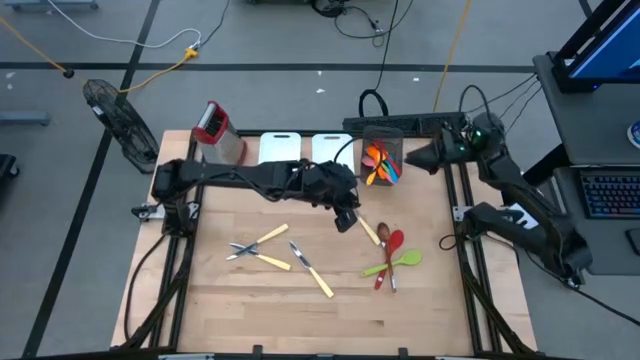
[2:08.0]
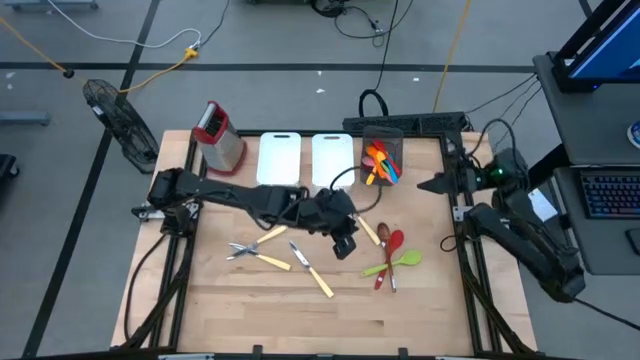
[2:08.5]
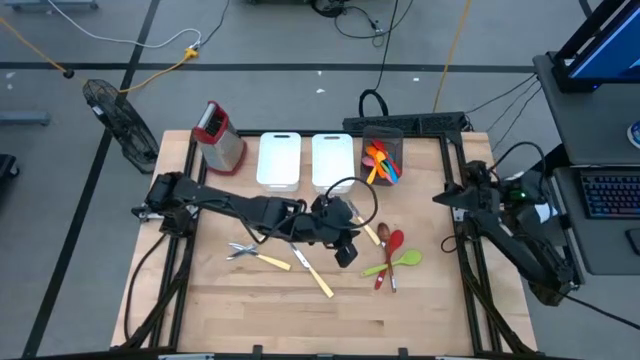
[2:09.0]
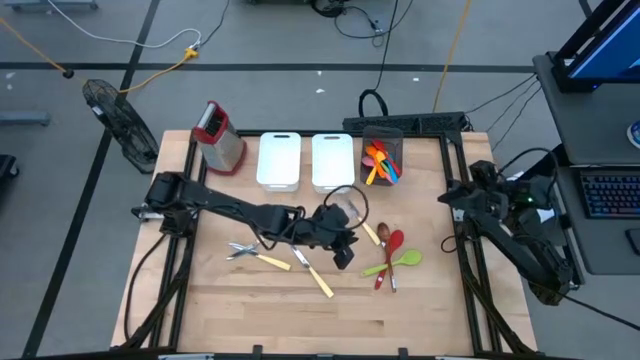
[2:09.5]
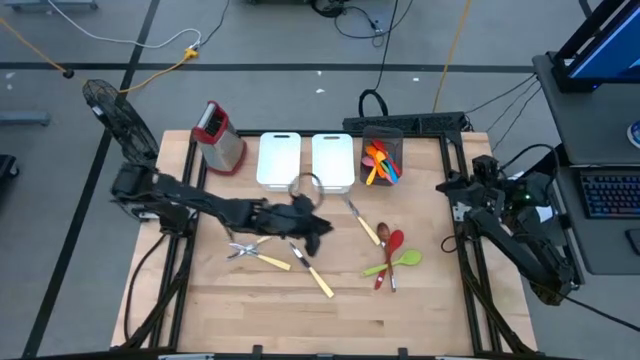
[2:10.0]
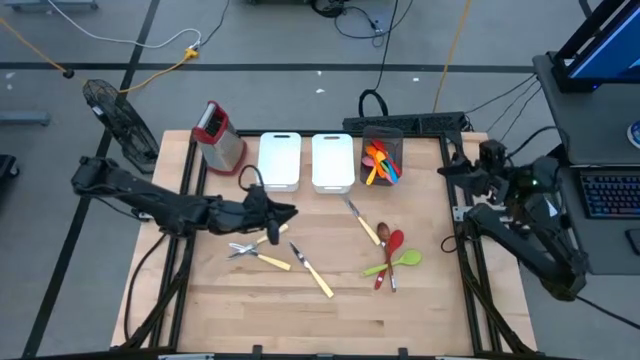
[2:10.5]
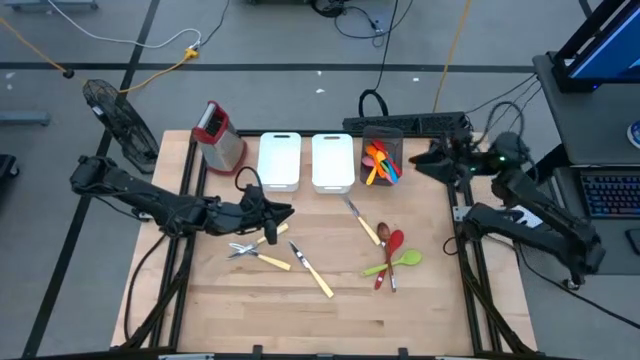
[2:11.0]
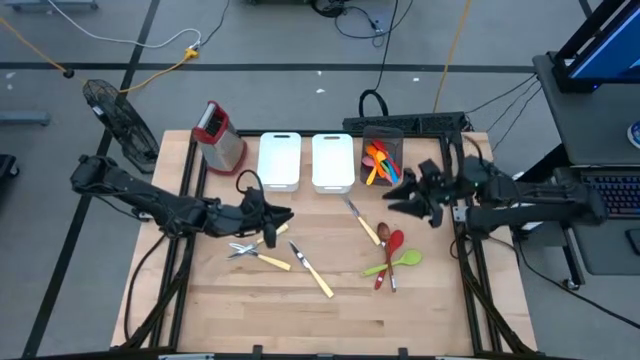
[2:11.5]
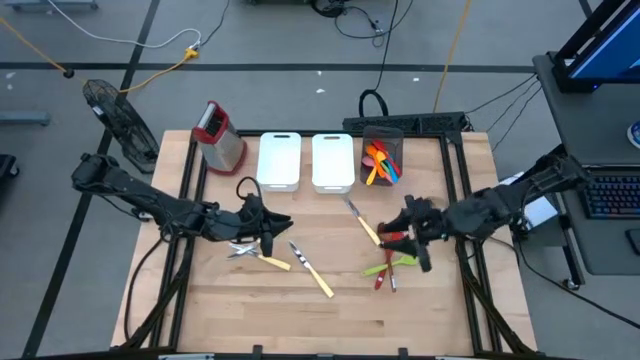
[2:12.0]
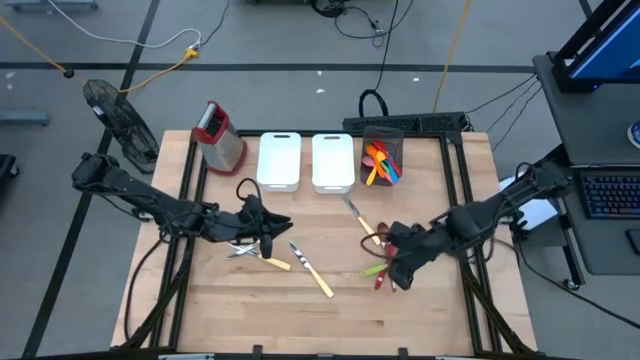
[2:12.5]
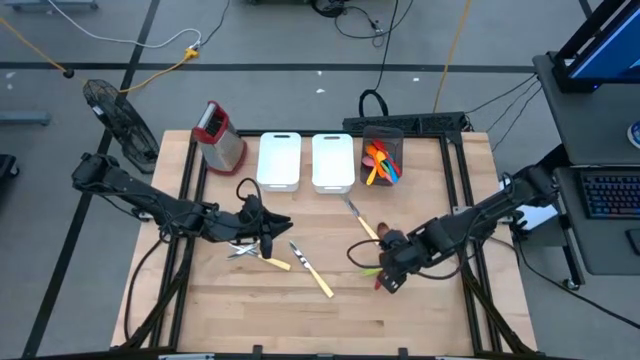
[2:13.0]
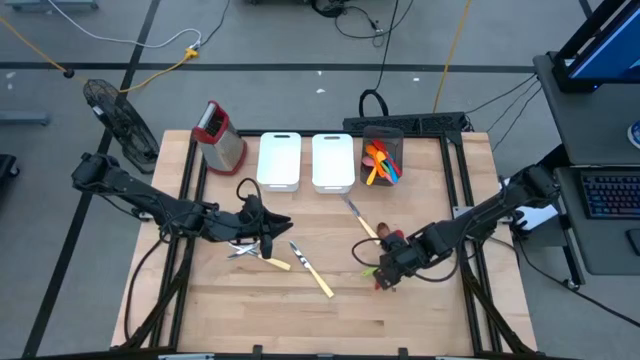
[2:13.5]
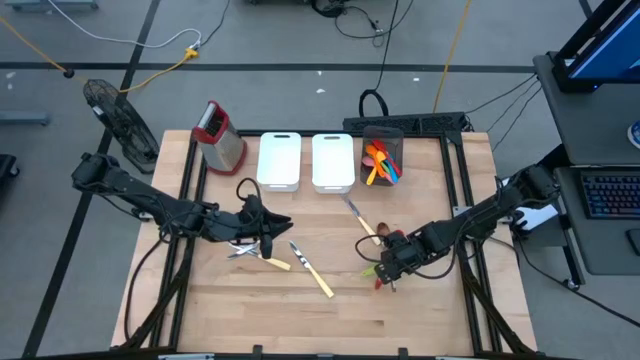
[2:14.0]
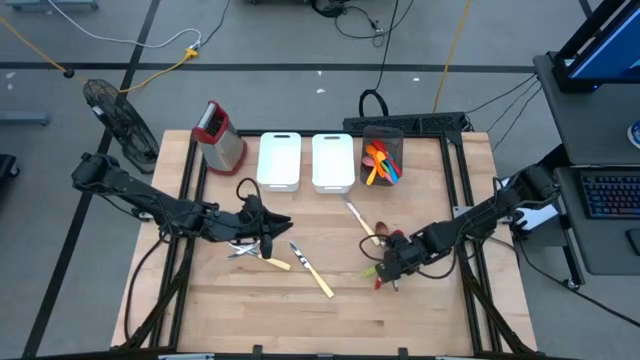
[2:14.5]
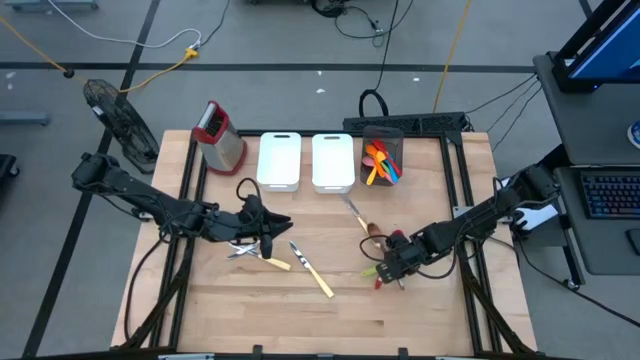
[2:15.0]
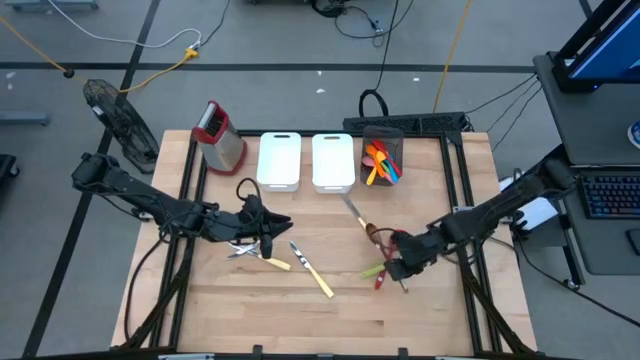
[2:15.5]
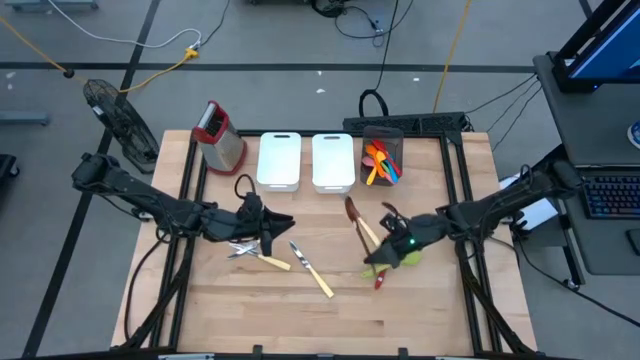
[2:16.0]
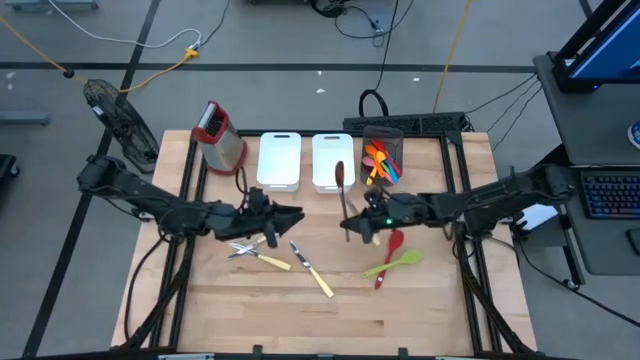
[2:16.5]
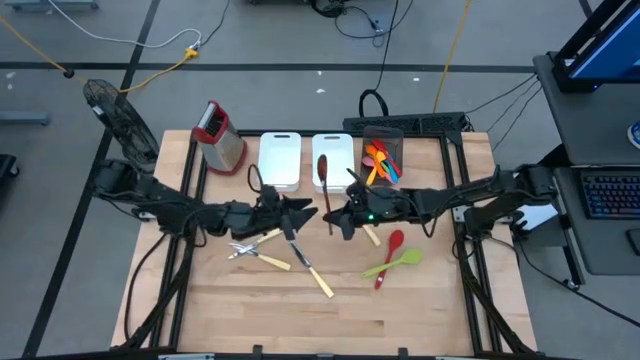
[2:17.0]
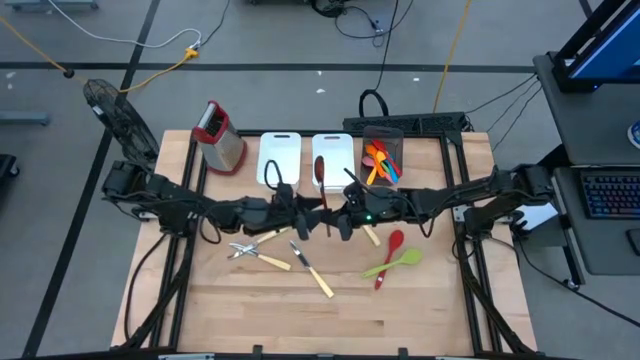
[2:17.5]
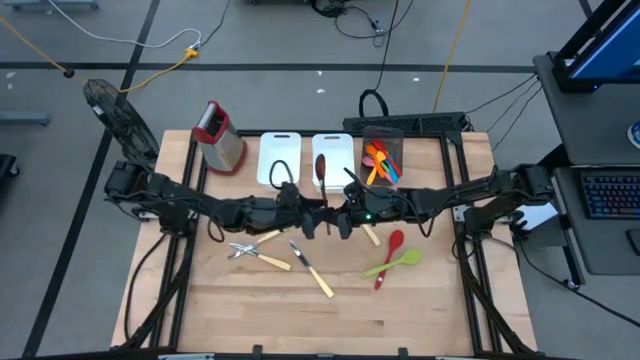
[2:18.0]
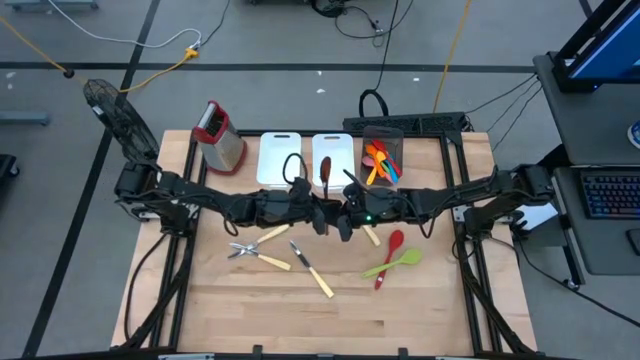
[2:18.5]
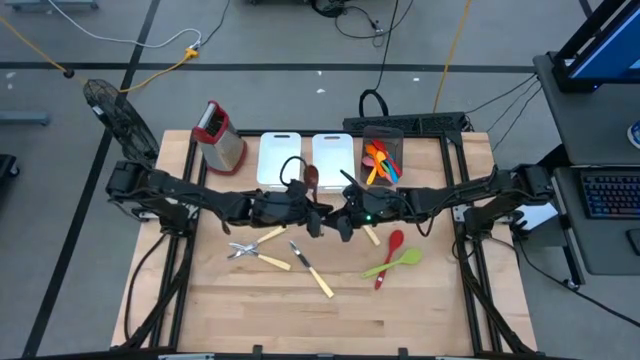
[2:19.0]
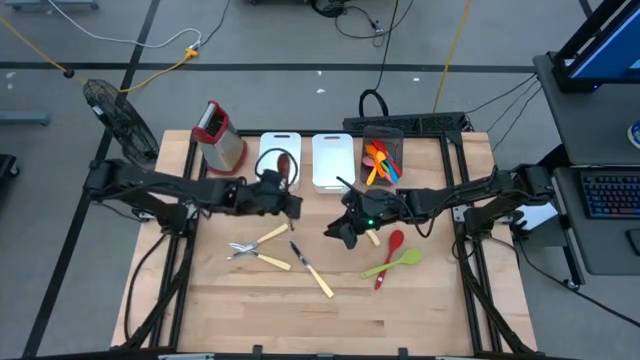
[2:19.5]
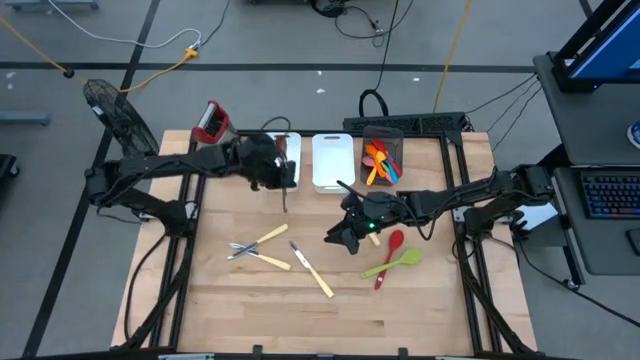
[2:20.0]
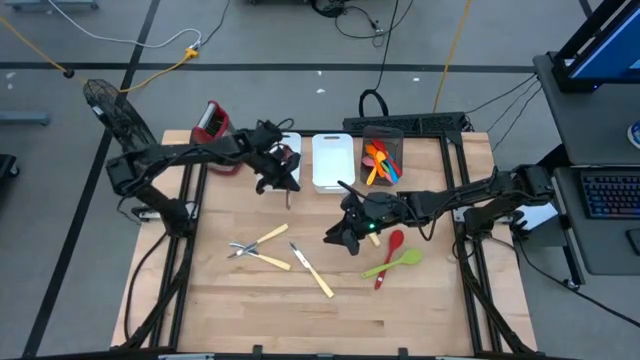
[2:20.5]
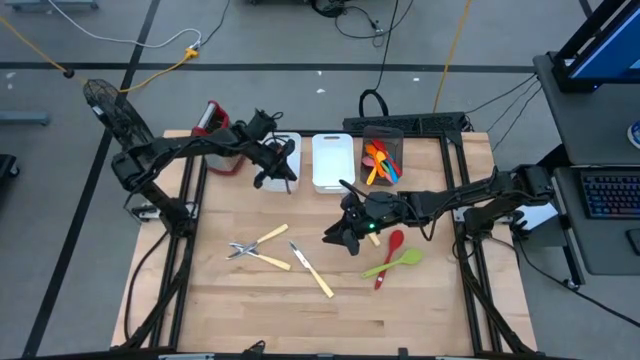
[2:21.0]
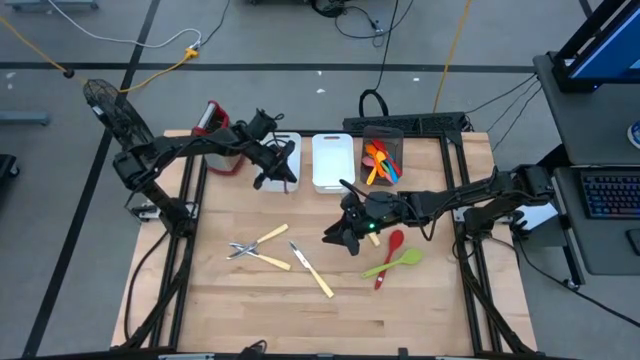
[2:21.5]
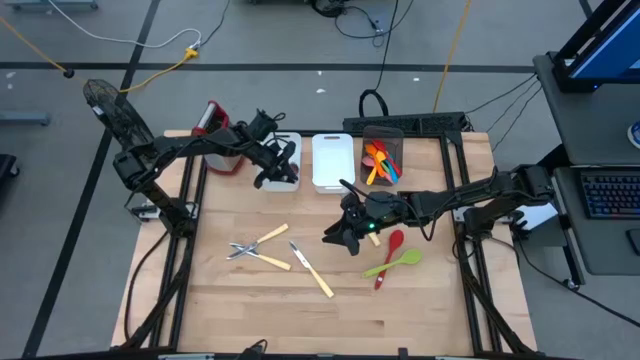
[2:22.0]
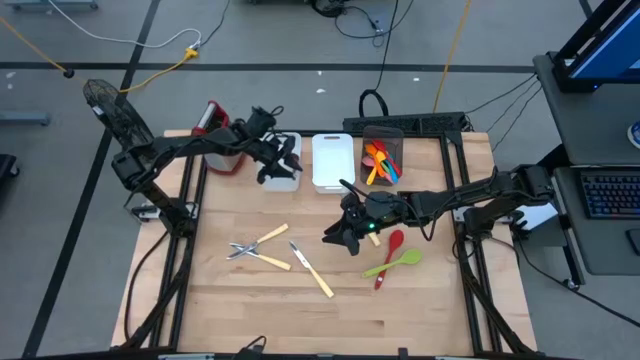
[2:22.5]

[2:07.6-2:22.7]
Task: Pick & Place Kitchen Items
Put the brown wooden serving spoon into the left white bin

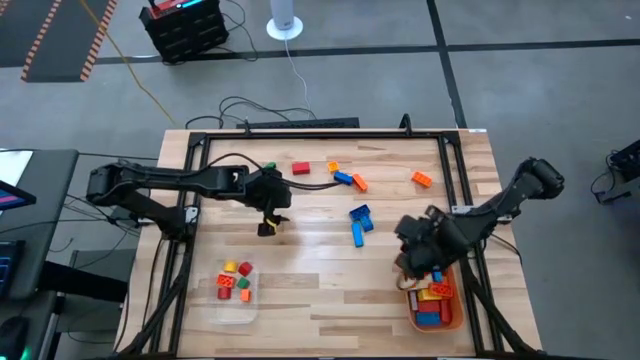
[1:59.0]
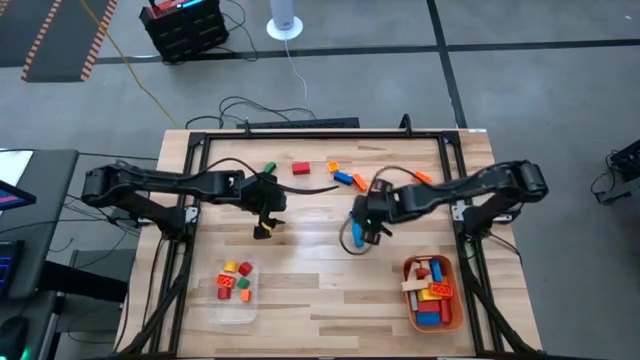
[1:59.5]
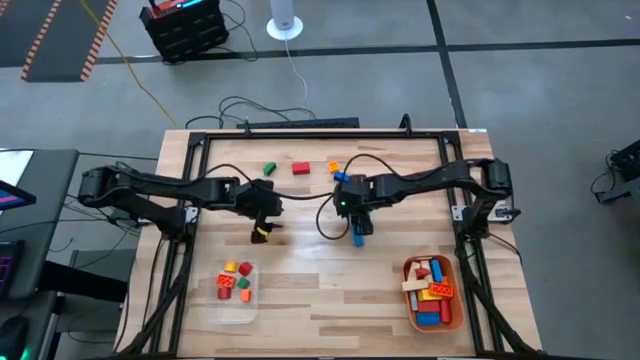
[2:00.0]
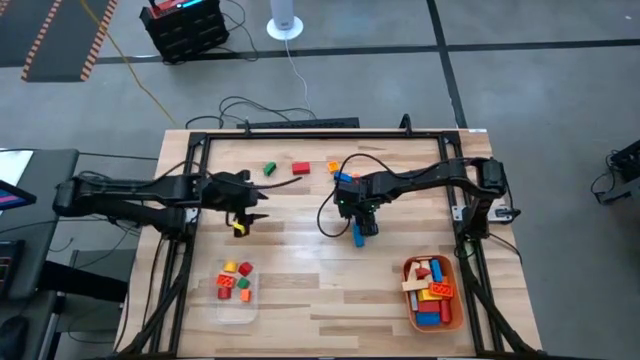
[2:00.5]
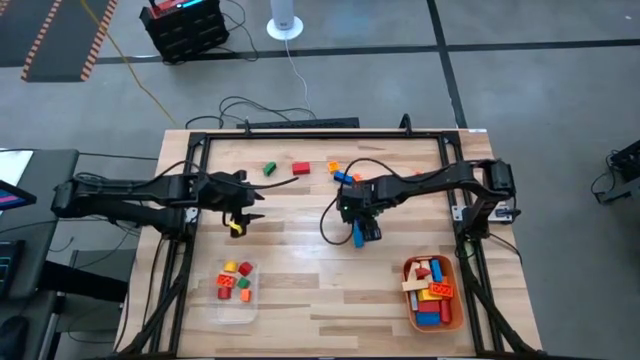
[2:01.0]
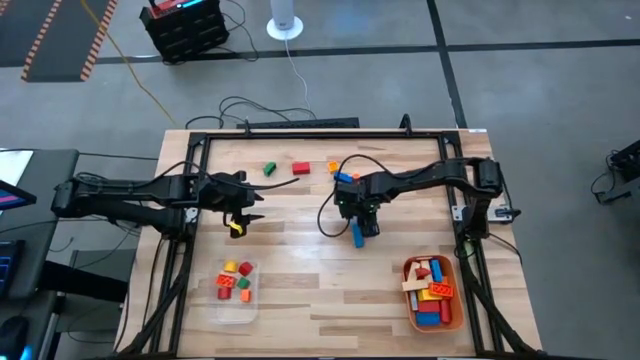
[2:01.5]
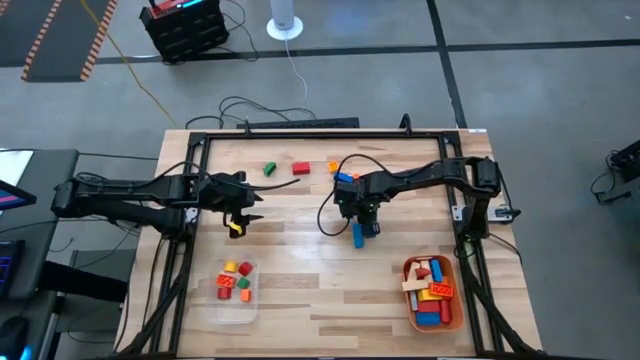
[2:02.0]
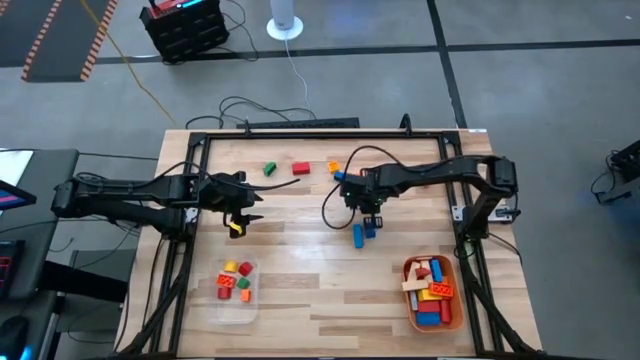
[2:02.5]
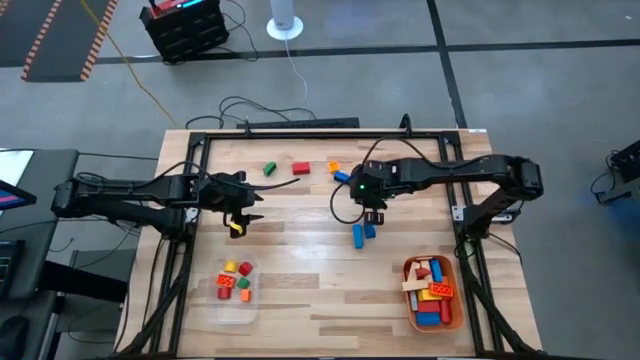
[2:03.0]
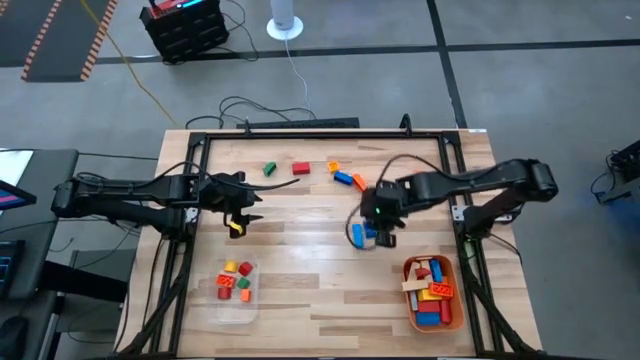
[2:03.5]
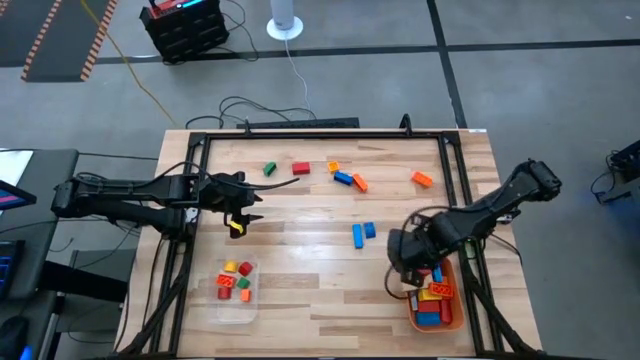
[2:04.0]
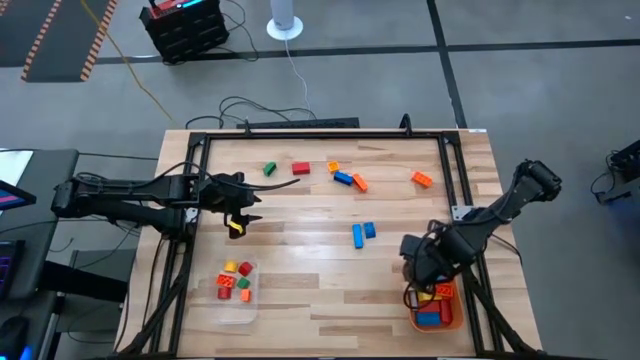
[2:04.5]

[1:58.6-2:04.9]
Task: Sort blocks by size
Put the large blue game piece into the orange bin

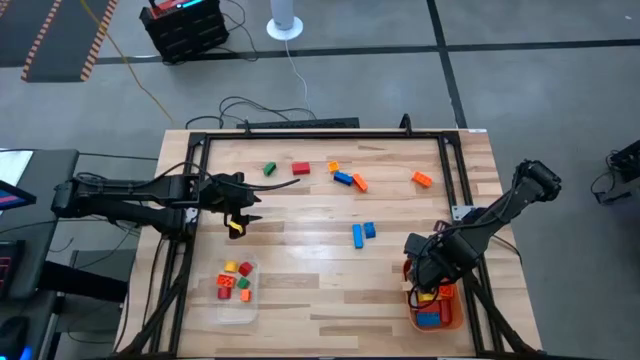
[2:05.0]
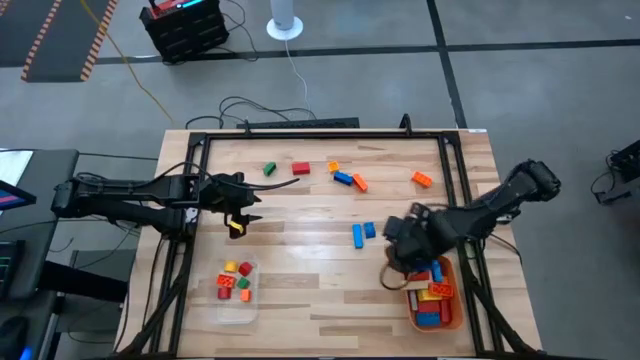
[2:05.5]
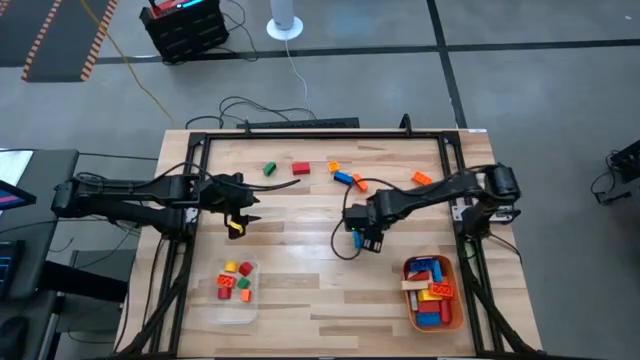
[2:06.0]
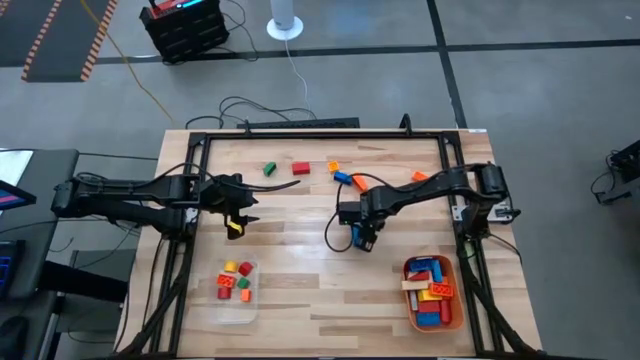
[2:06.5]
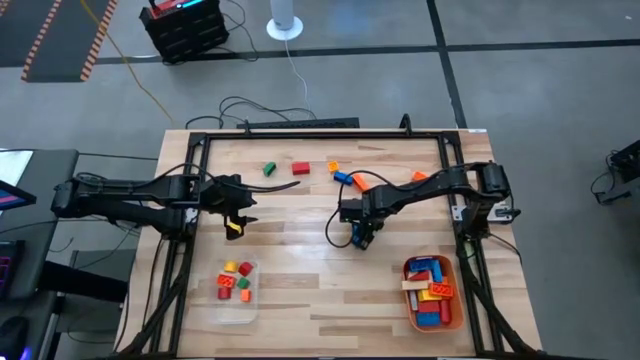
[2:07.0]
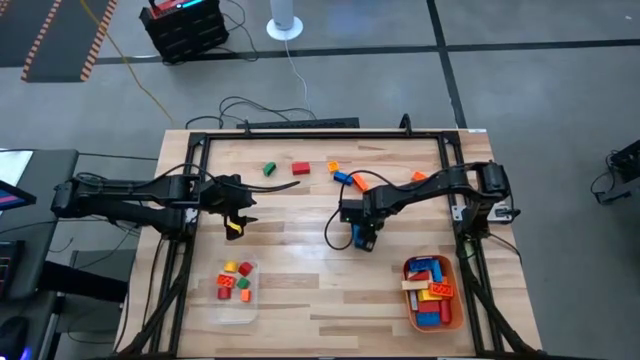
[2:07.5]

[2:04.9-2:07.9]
Put the small blue game piece into the transparent bin
